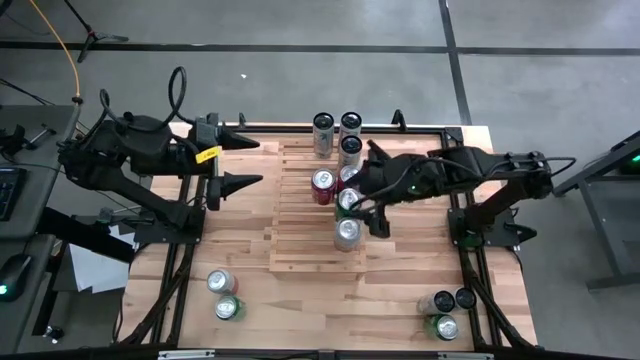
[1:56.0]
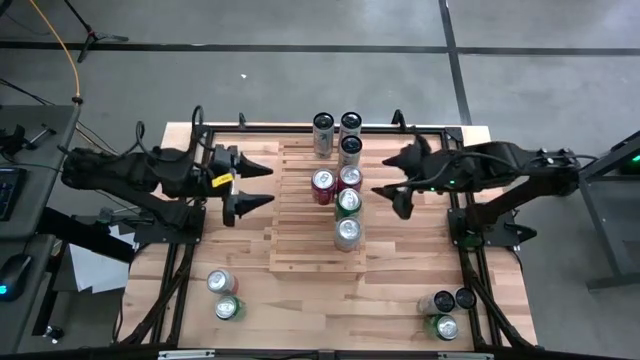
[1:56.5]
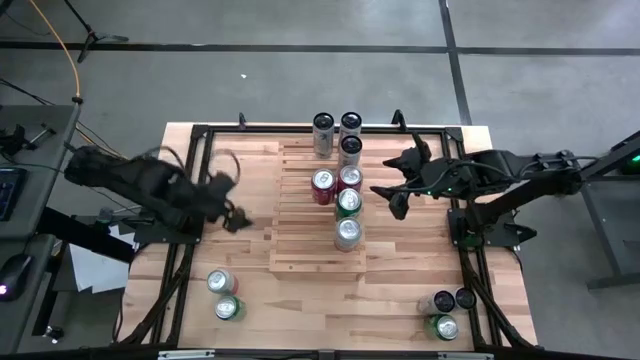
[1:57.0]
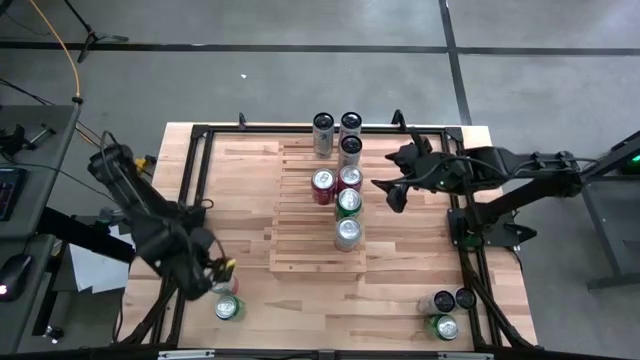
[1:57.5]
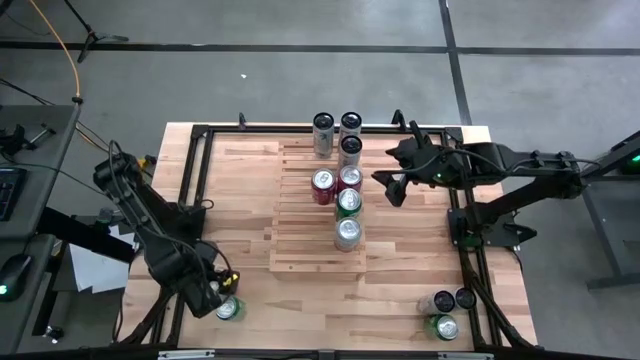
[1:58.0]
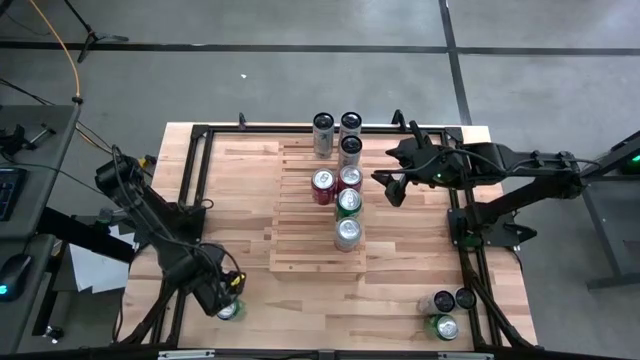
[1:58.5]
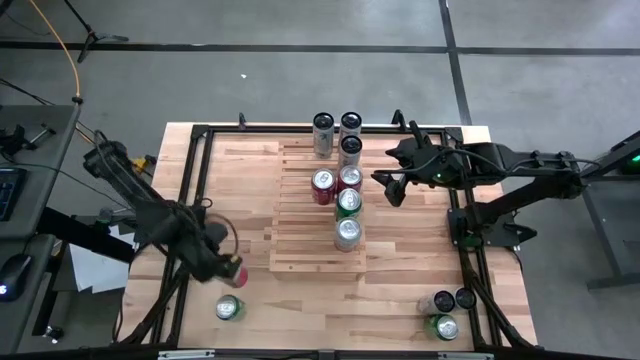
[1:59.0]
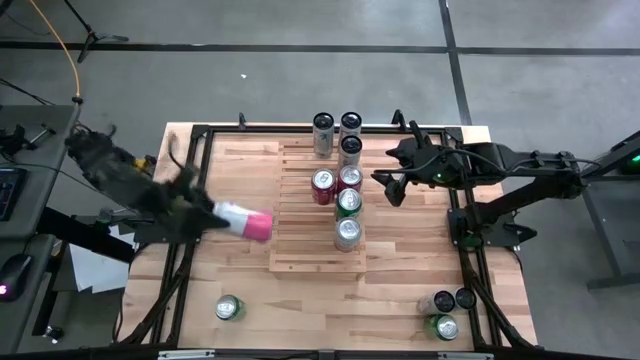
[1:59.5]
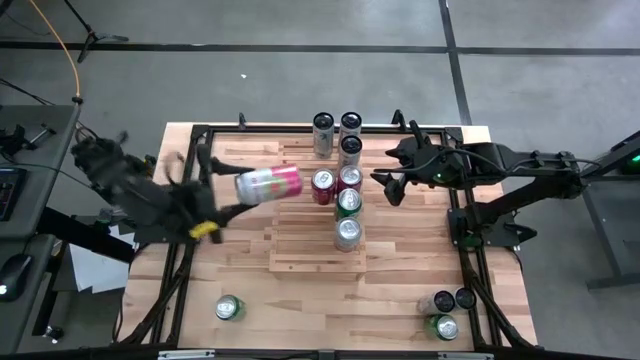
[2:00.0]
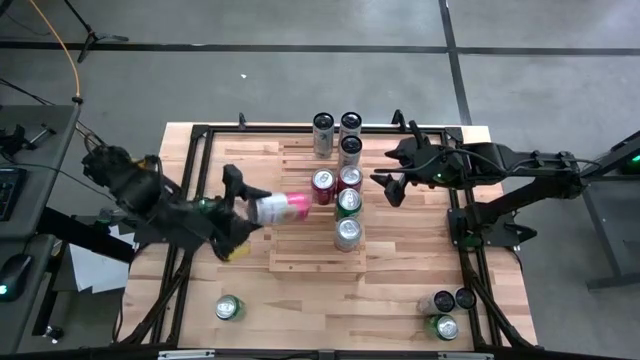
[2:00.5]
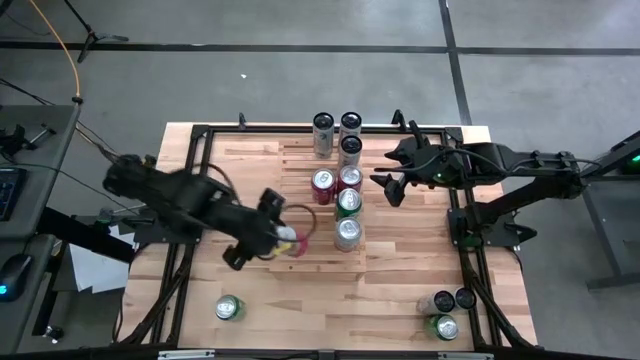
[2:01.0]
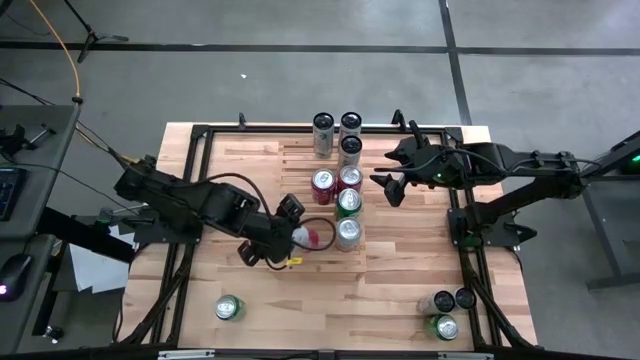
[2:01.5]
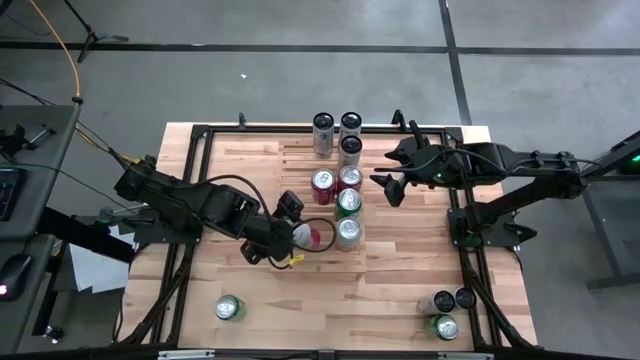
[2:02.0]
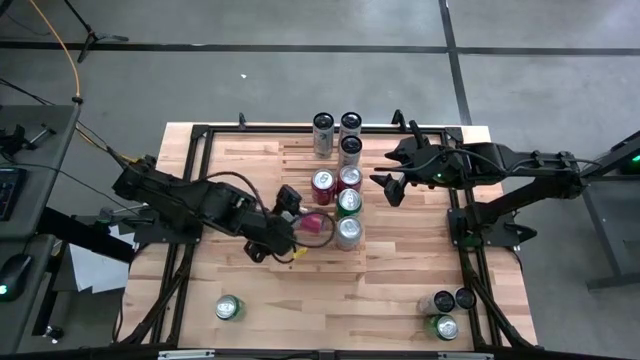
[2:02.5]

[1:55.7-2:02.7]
Task: Place canned beverage on shelf
Put the pink white soda can on the shelf

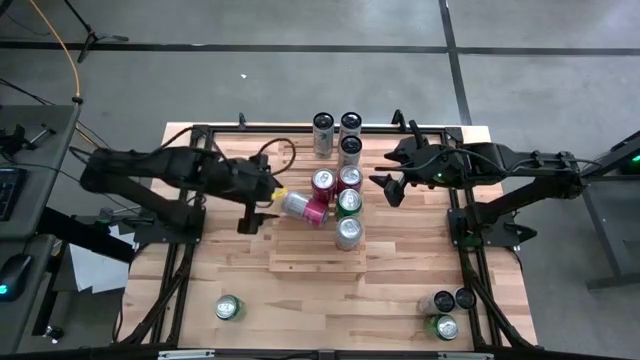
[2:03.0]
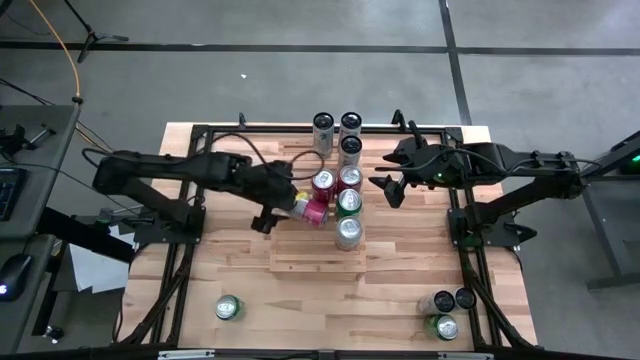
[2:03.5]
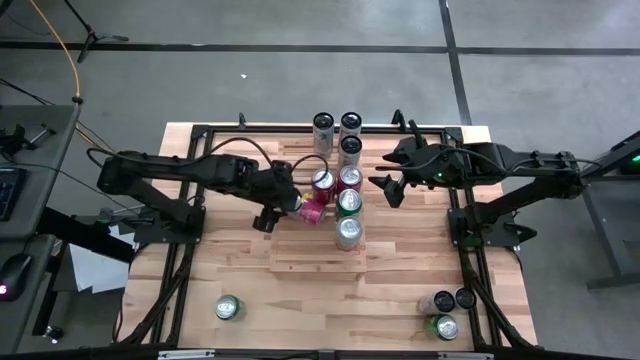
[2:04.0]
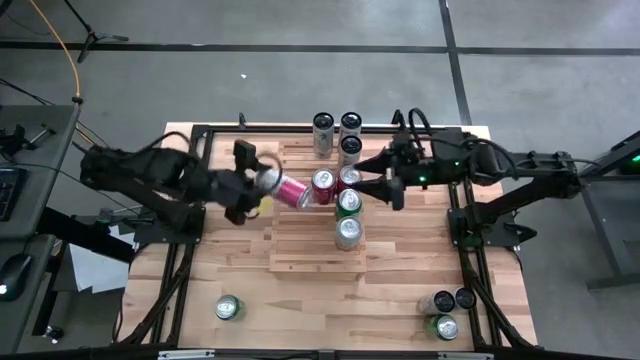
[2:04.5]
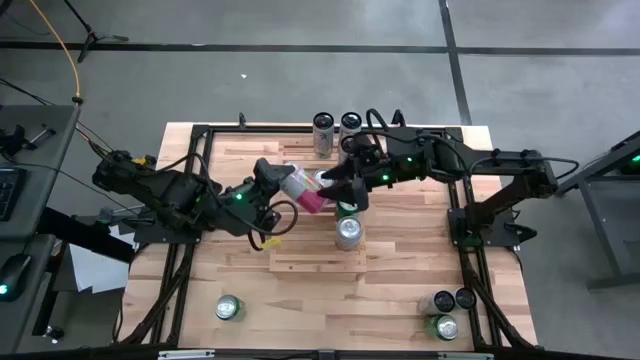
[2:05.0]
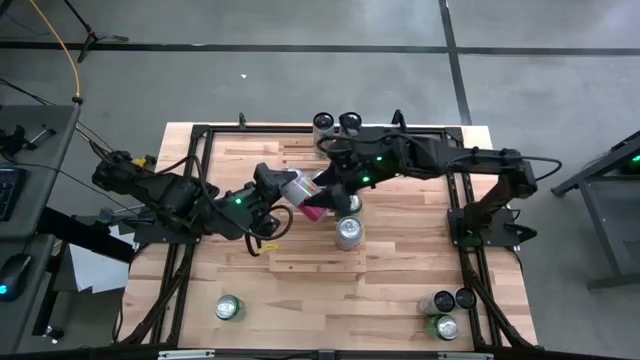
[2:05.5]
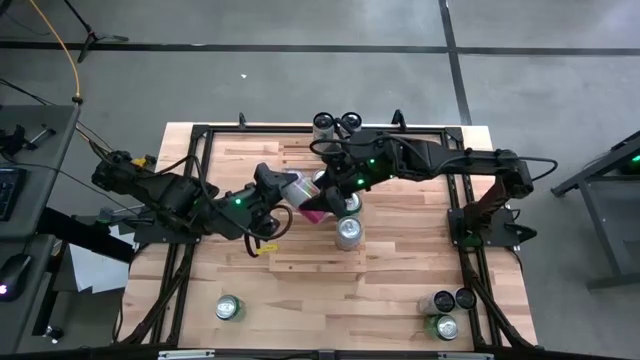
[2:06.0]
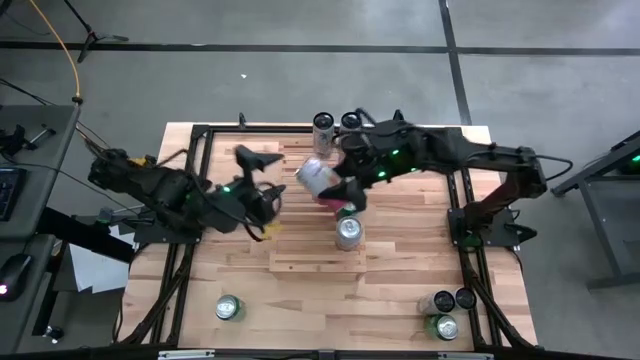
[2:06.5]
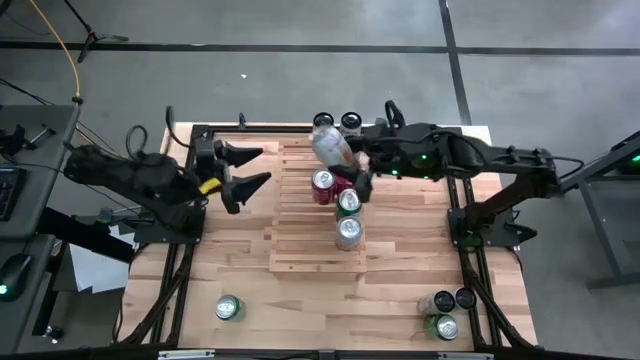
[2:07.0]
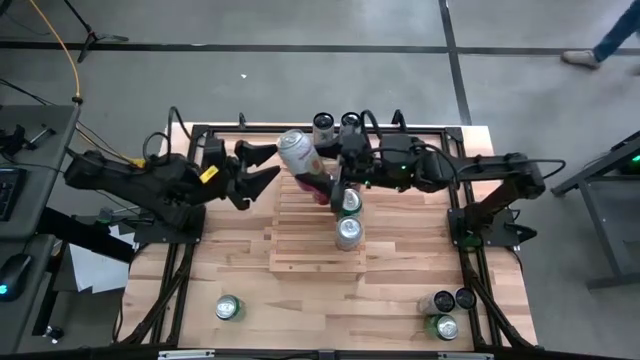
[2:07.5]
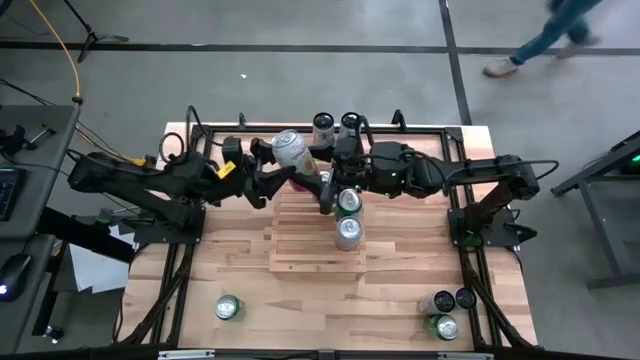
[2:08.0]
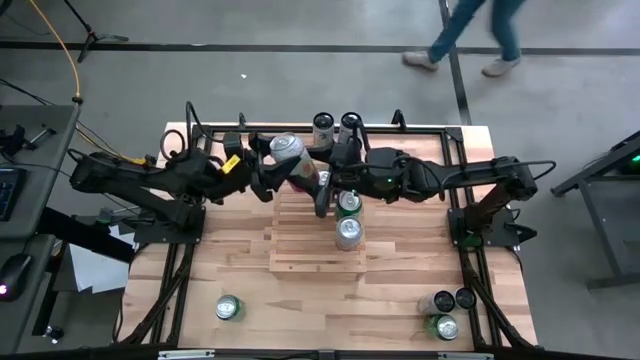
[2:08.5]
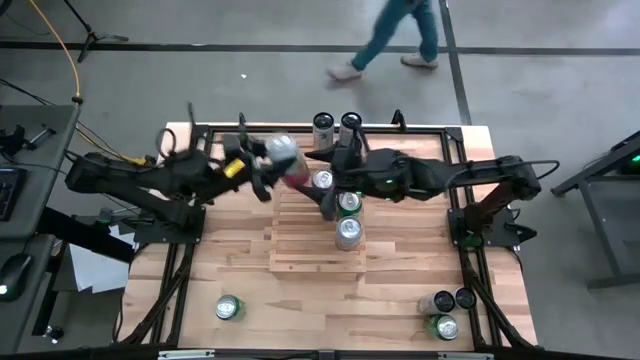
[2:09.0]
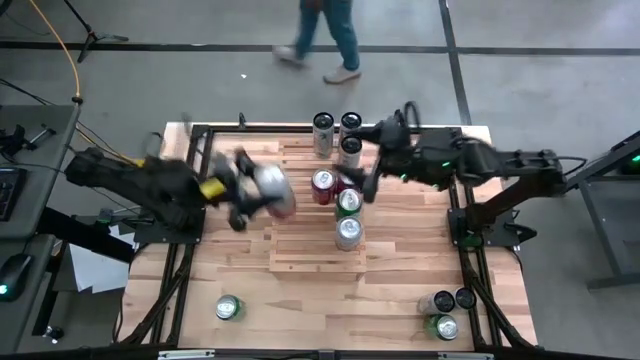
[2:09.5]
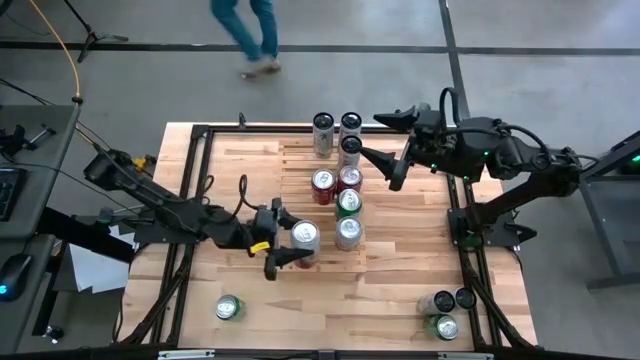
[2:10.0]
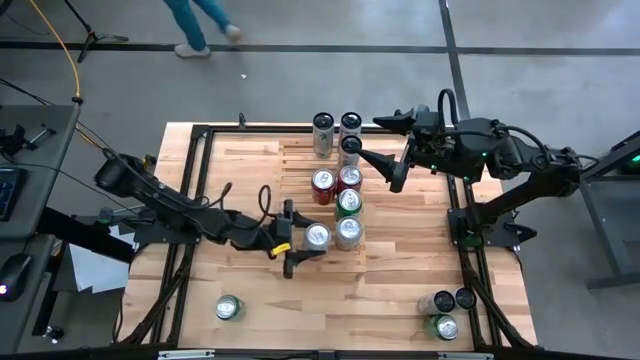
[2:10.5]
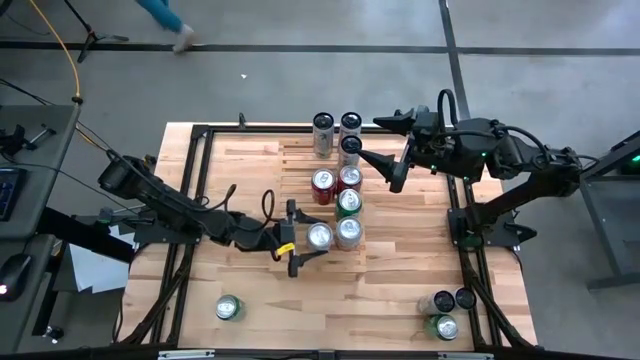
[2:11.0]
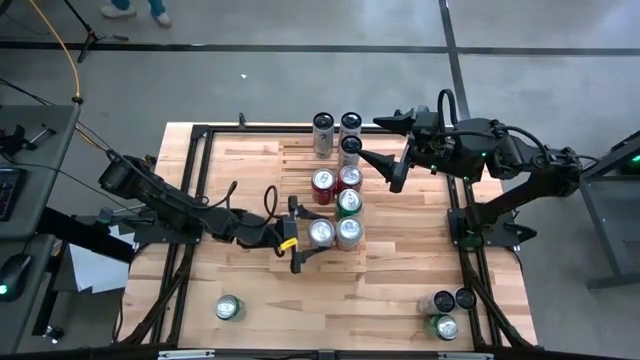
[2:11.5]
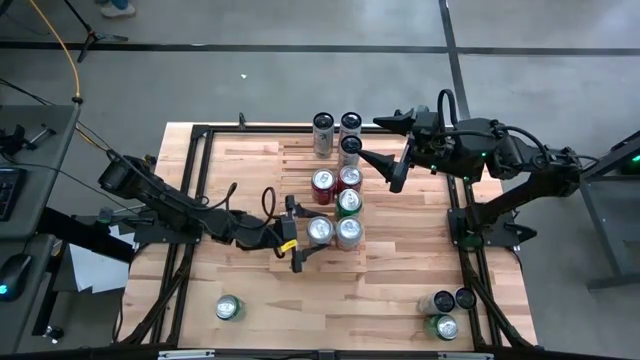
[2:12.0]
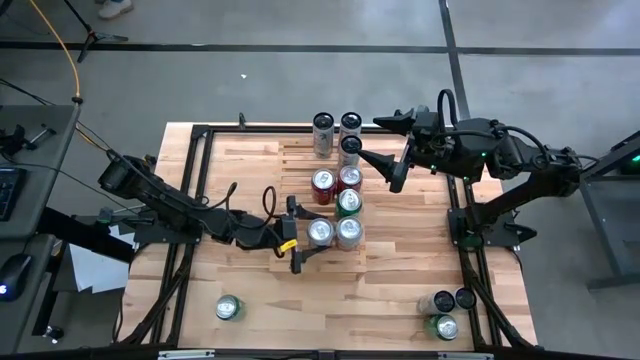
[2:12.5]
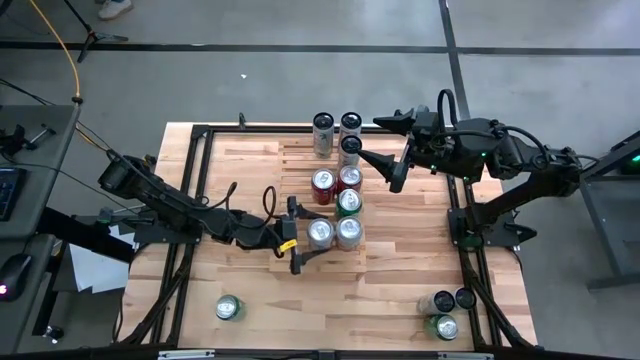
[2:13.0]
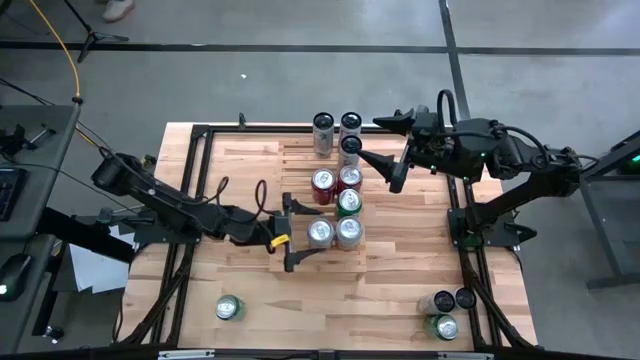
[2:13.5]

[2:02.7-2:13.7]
Put the pink white soda can on the shelf
